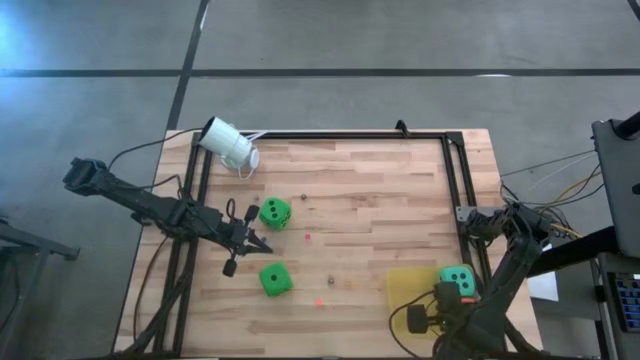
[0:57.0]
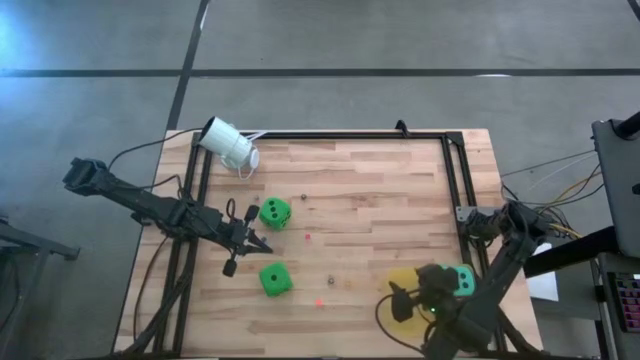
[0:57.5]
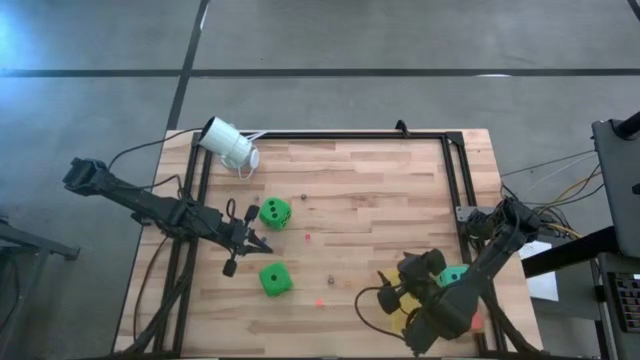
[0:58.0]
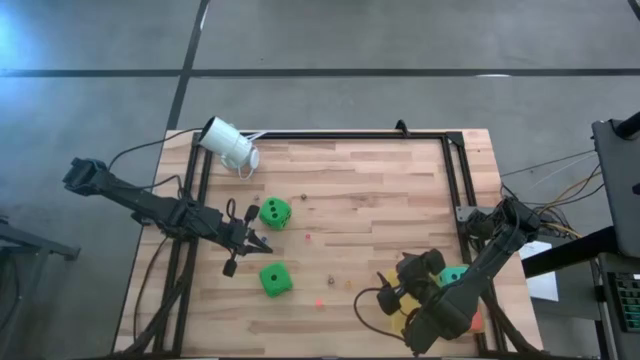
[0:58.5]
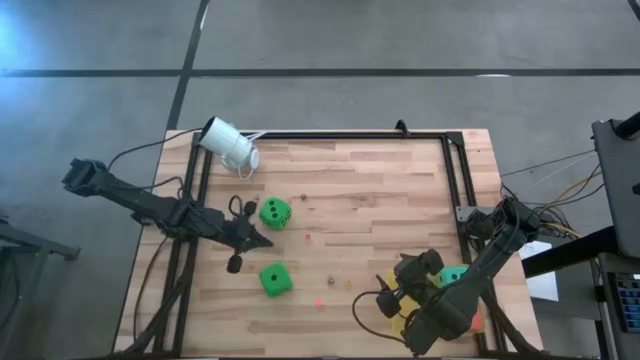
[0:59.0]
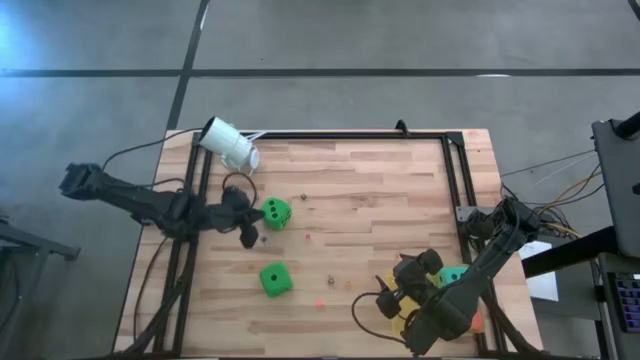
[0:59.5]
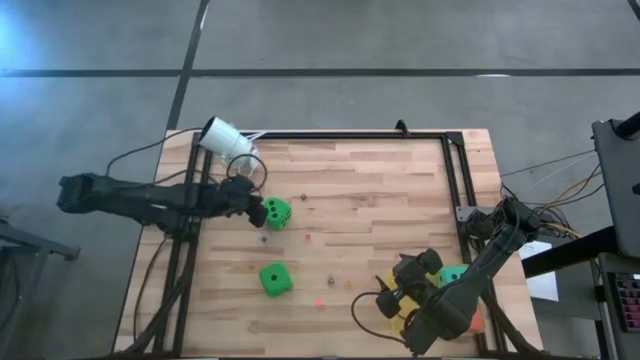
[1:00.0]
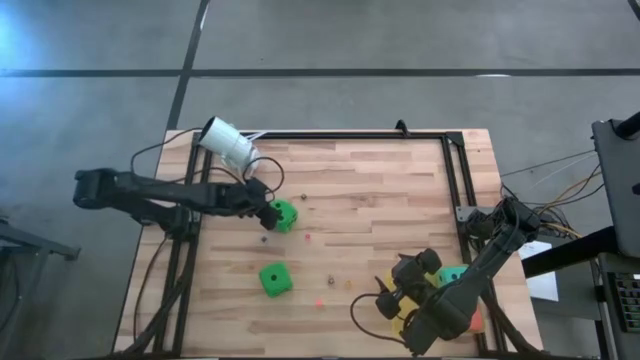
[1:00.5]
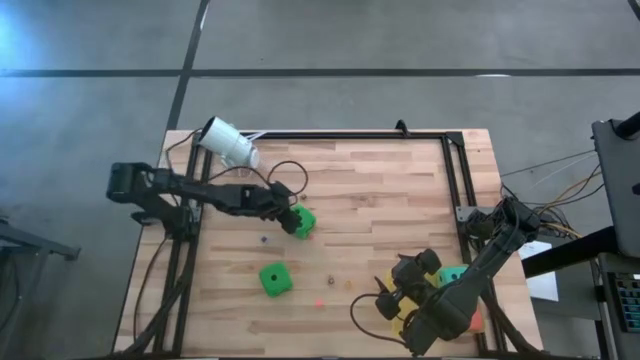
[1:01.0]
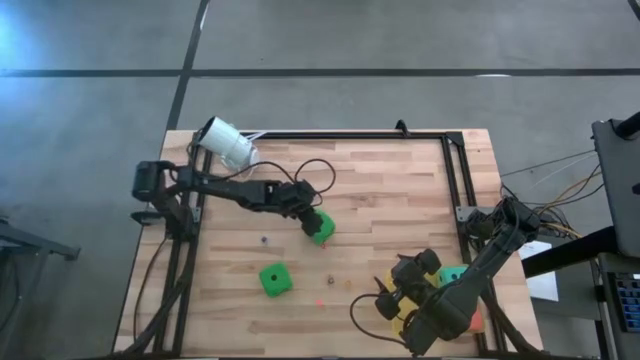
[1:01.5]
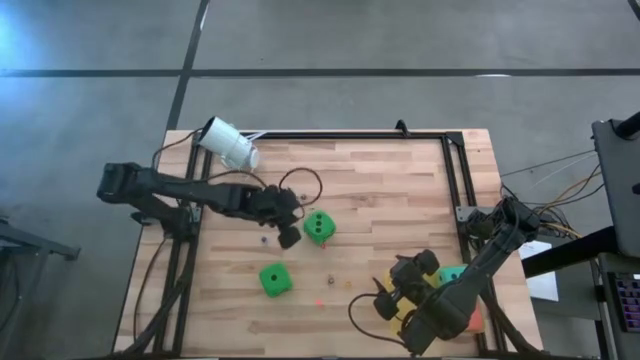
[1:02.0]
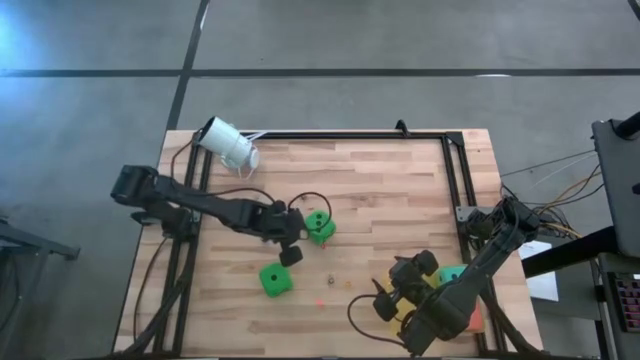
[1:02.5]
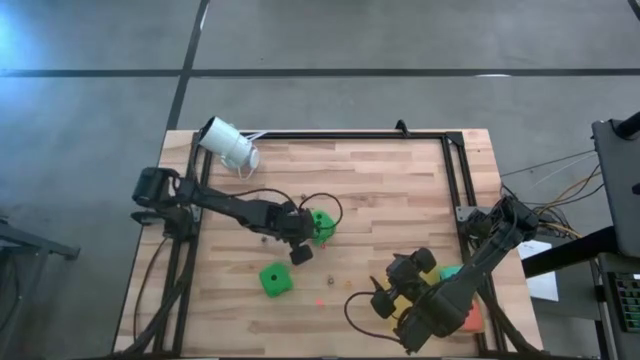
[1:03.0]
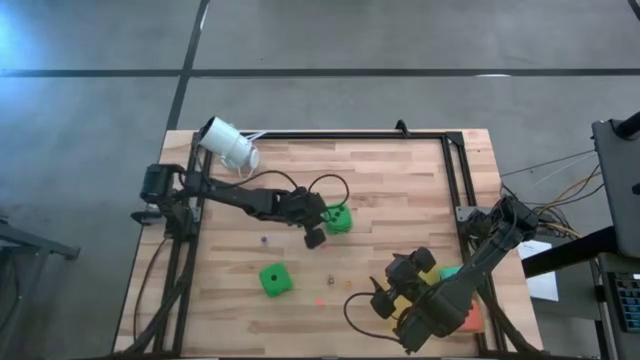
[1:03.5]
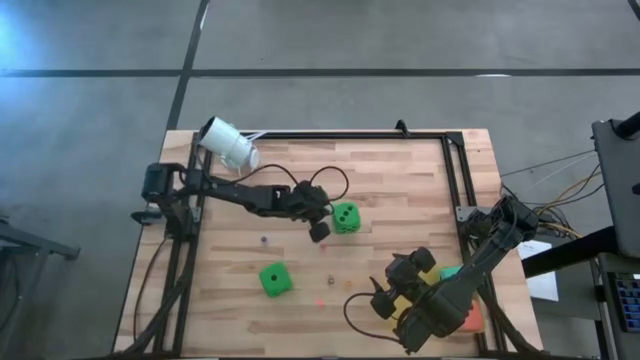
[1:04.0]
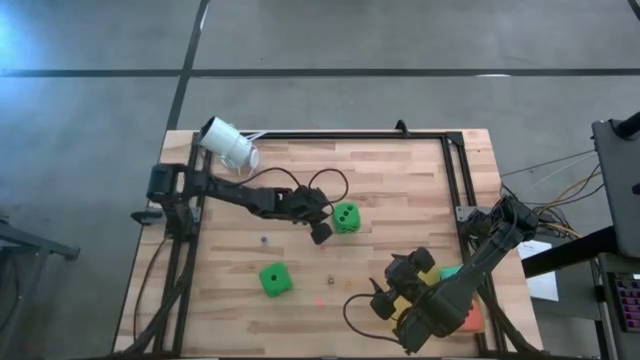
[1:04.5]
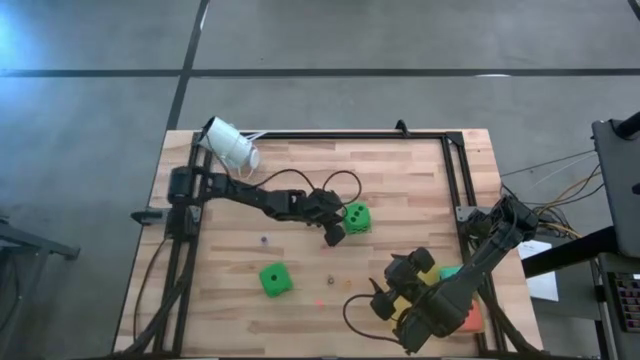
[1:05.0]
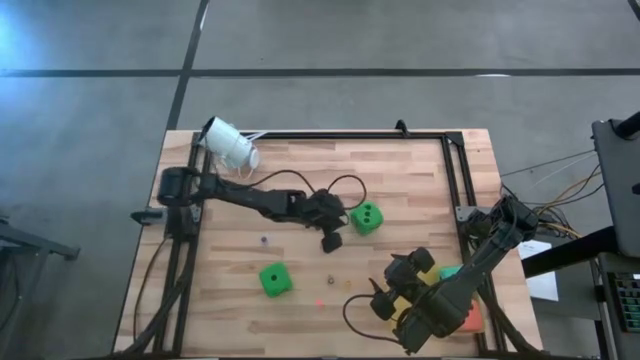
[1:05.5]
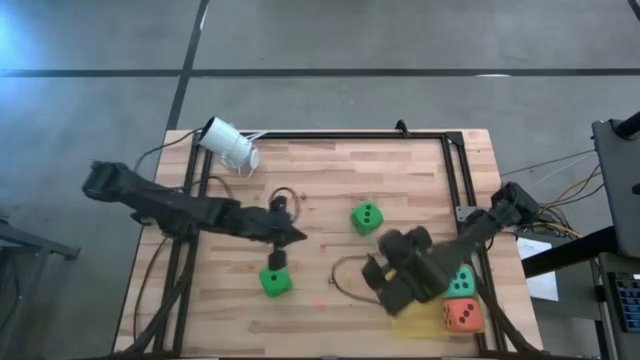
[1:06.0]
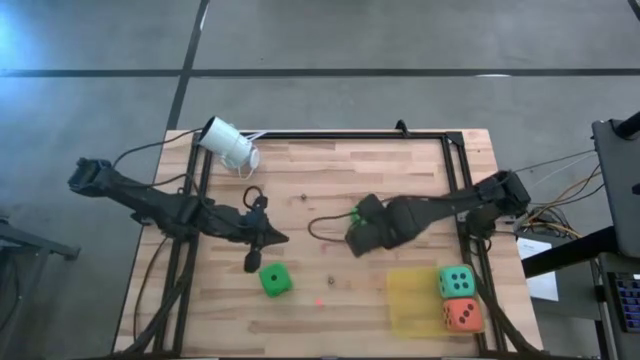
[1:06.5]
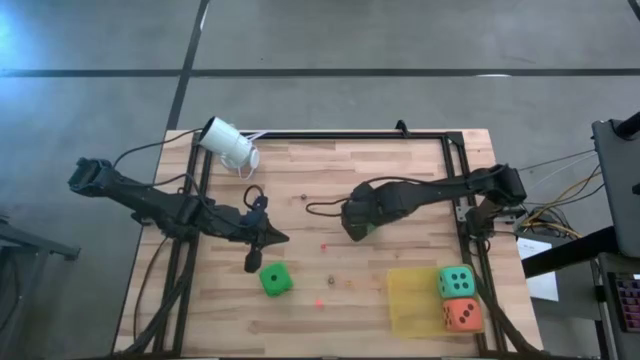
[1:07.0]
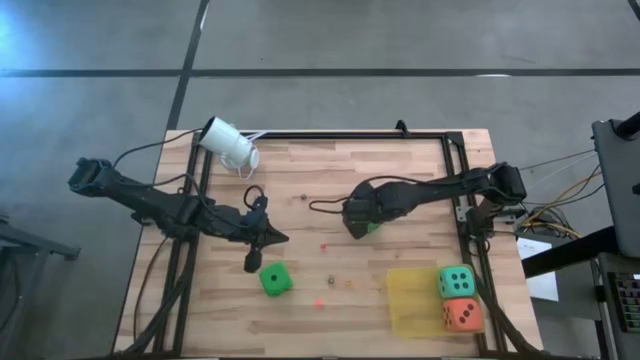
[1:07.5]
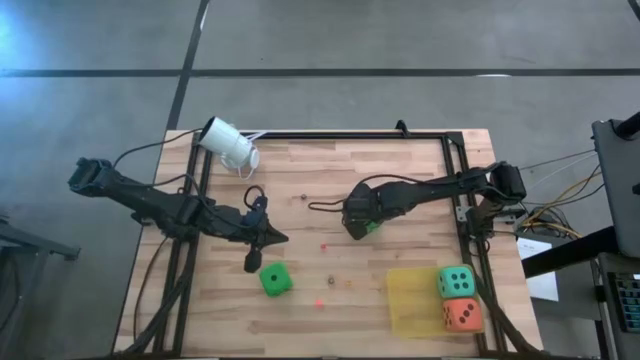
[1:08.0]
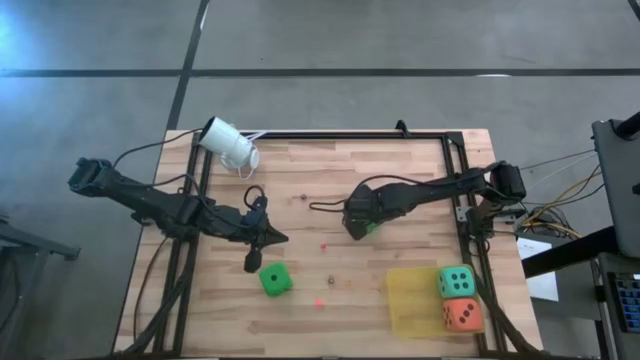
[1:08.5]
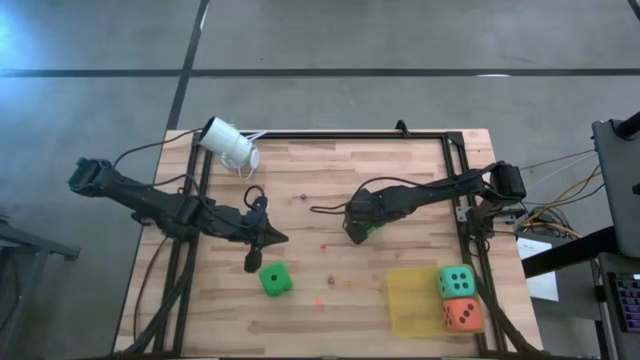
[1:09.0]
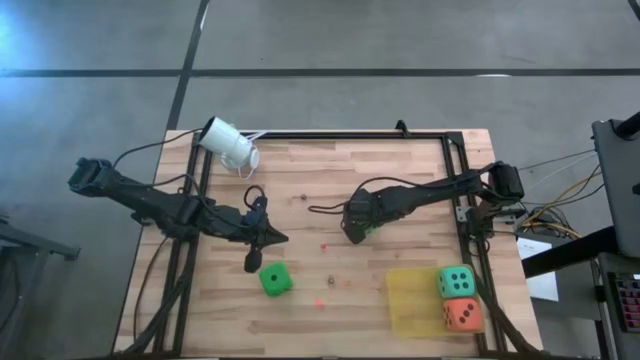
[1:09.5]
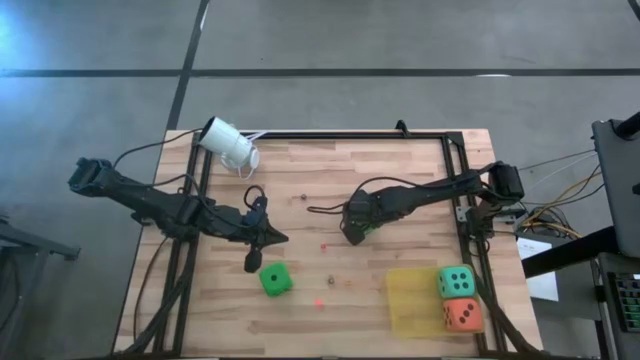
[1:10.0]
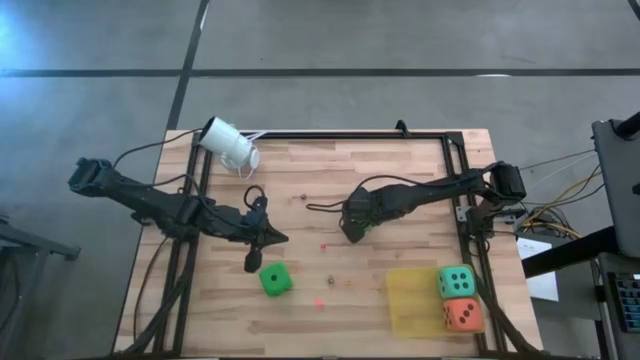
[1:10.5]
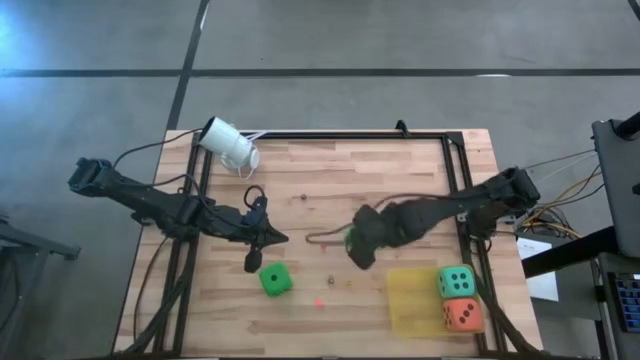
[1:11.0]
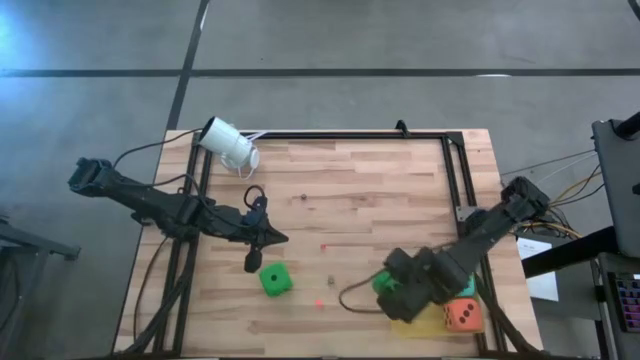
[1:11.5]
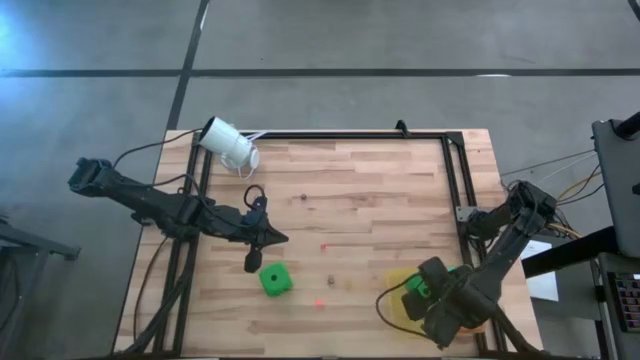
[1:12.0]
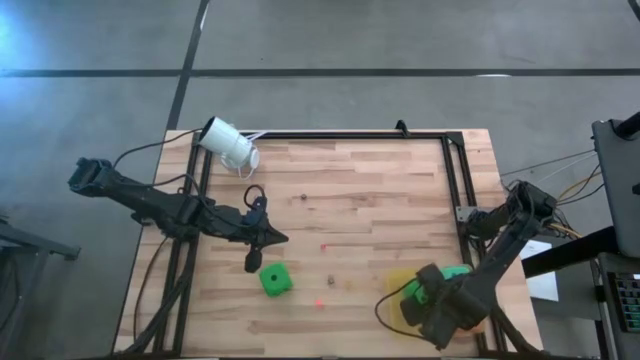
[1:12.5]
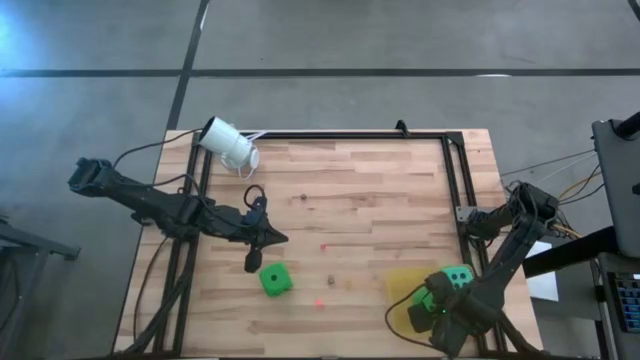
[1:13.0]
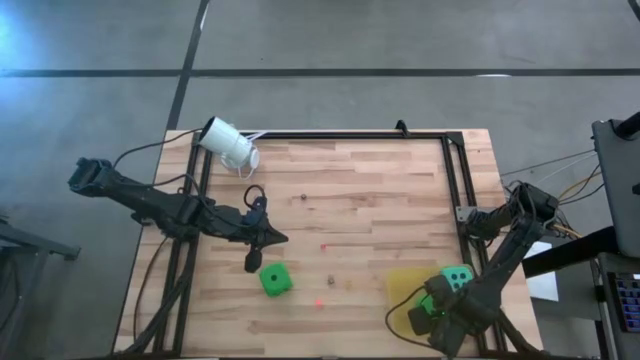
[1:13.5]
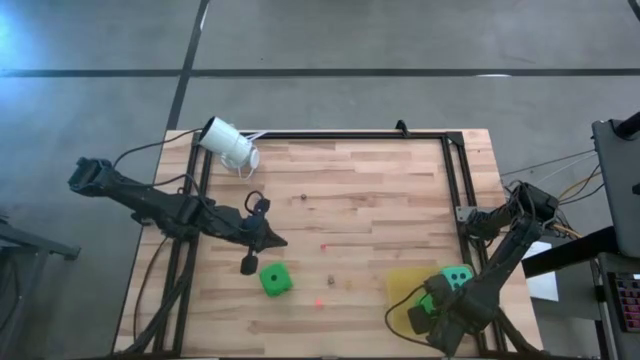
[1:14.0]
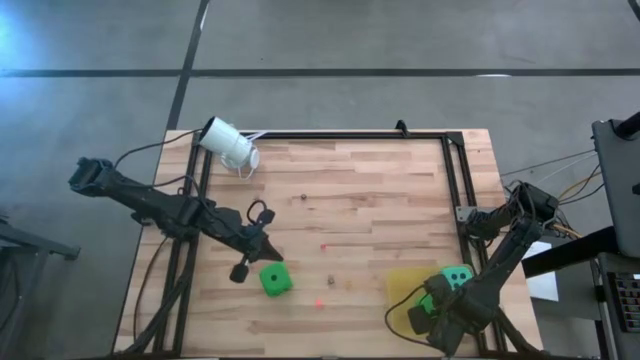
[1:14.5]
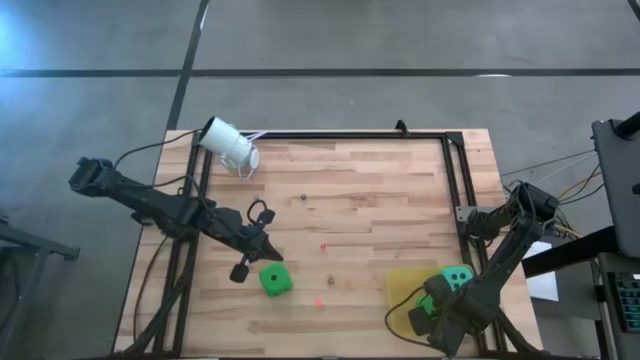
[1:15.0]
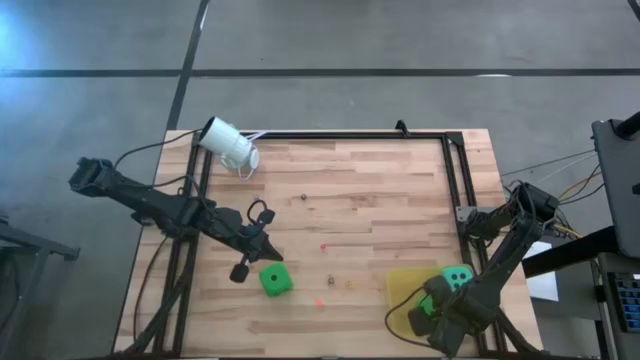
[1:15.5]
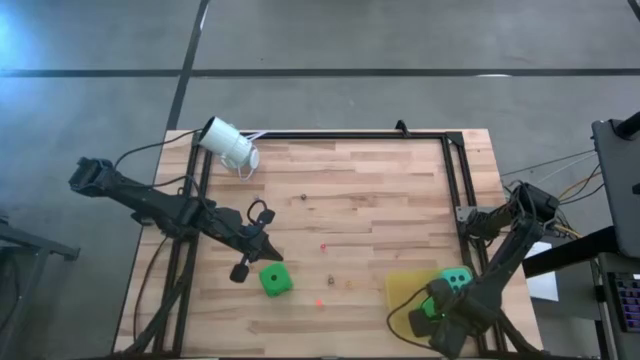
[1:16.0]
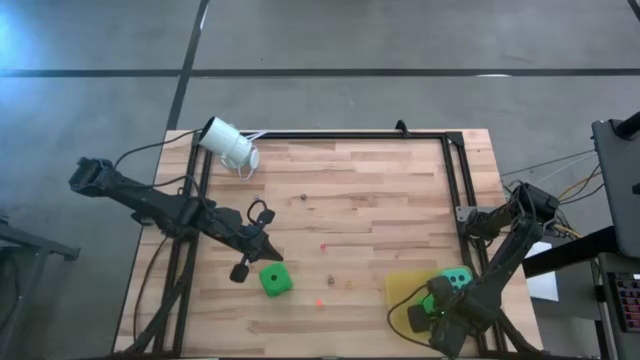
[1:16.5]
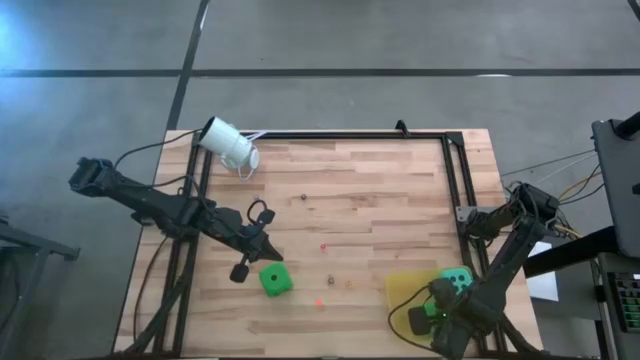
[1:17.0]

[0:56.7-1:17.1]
Task: Pick & Place Dice
Put the top large green die into the yellow bin

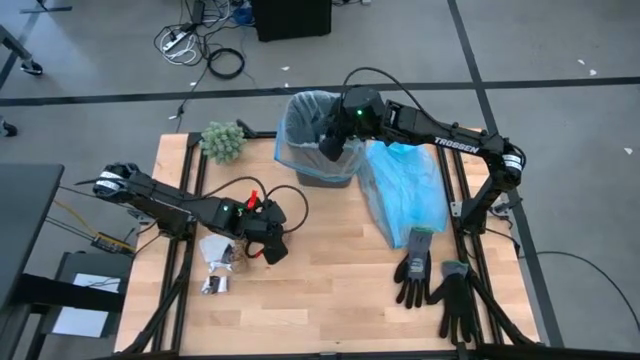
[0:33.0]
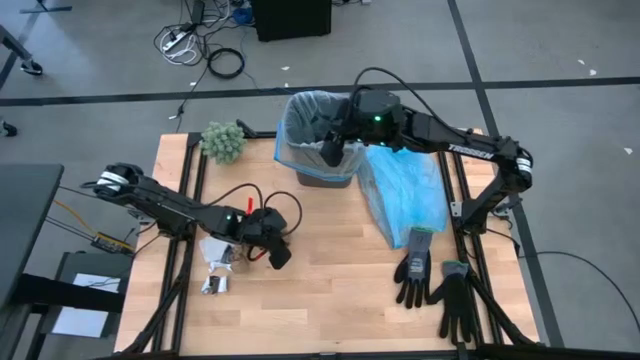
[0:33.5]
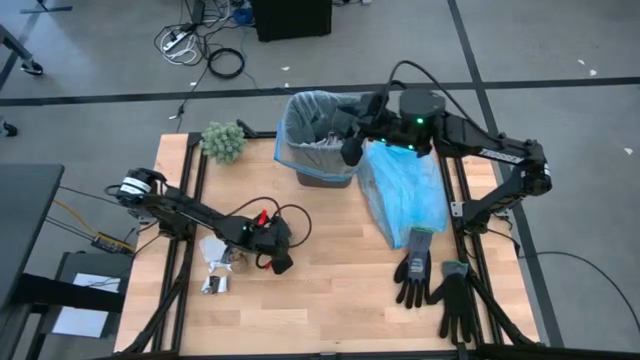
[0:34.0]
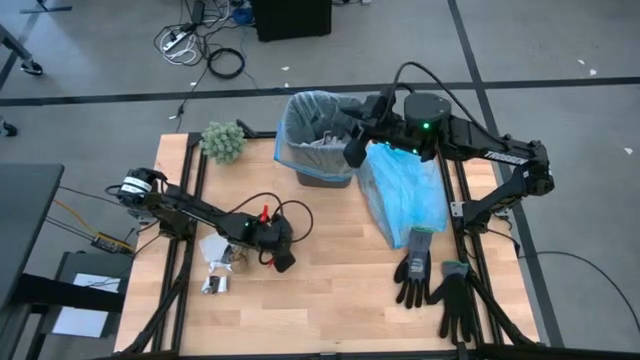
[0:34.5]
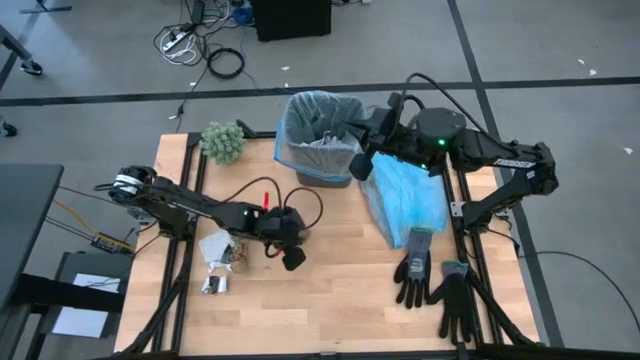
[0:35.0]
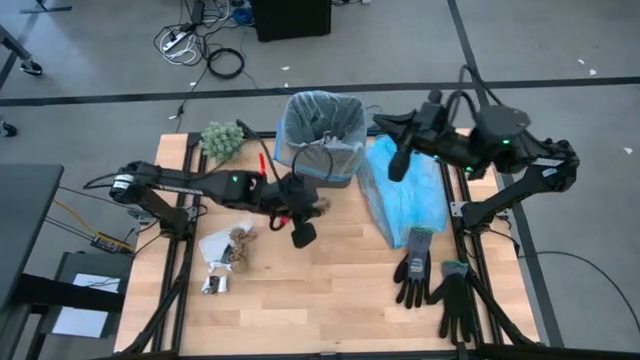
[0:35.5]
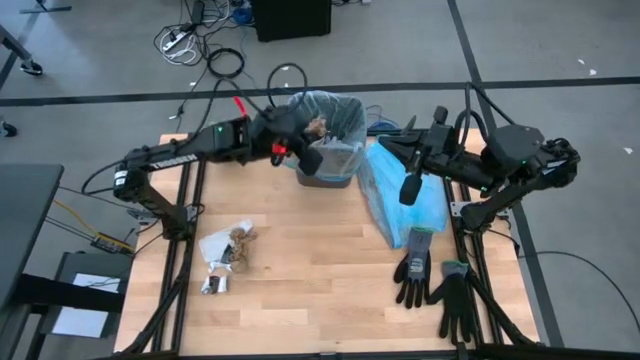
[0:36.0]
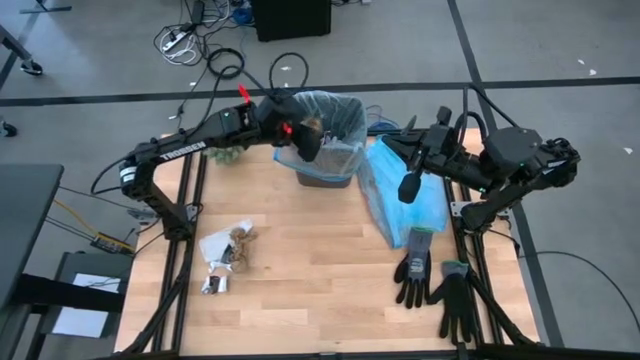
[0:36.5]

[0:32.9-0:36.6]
Task: place trash/remove bag and relplace
Put the brown napkin into the trash bin
